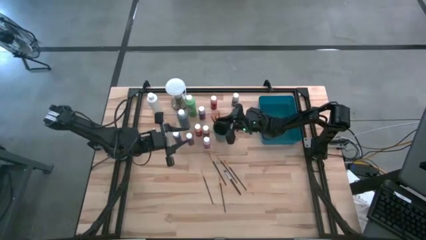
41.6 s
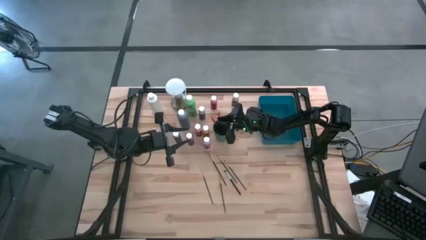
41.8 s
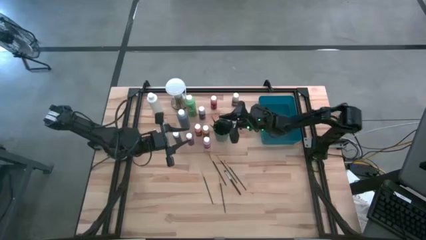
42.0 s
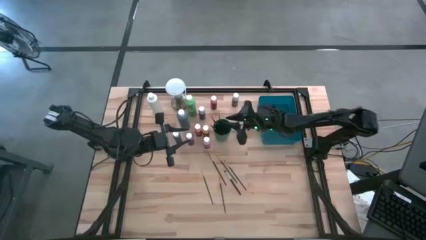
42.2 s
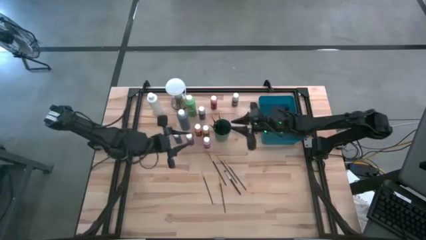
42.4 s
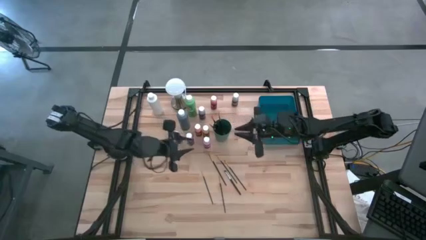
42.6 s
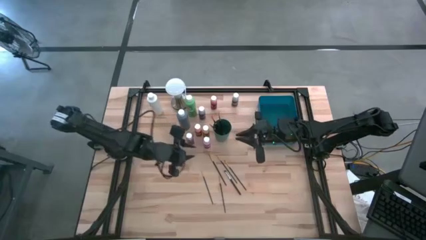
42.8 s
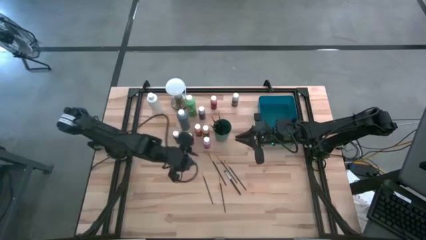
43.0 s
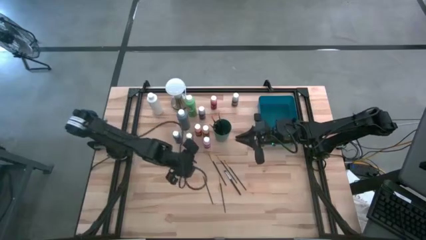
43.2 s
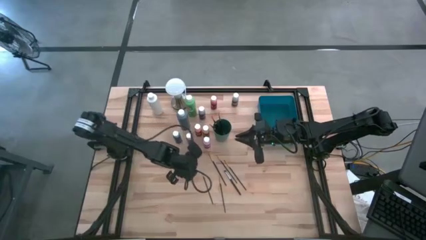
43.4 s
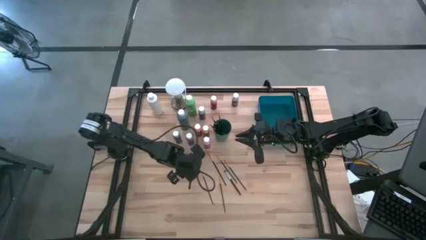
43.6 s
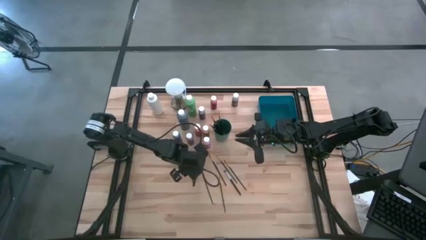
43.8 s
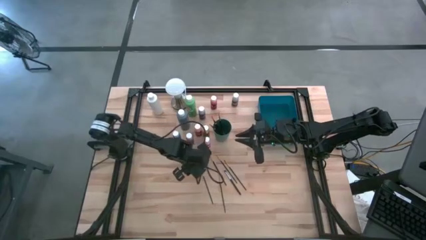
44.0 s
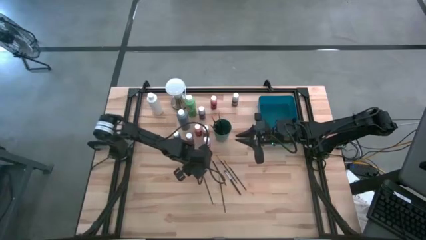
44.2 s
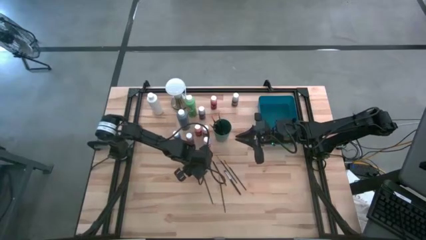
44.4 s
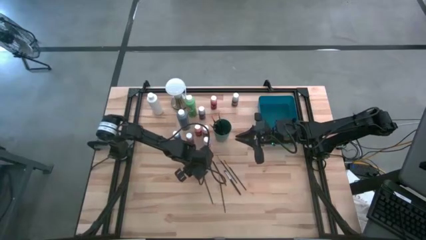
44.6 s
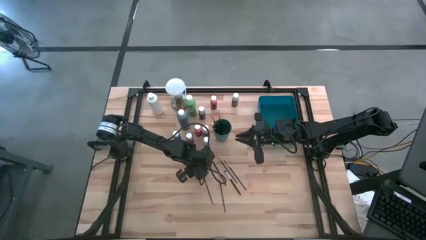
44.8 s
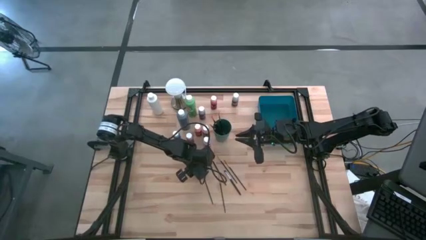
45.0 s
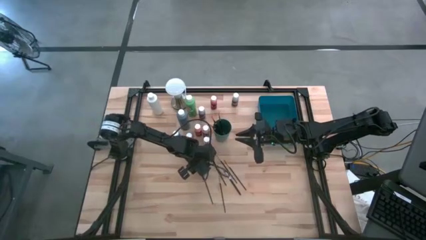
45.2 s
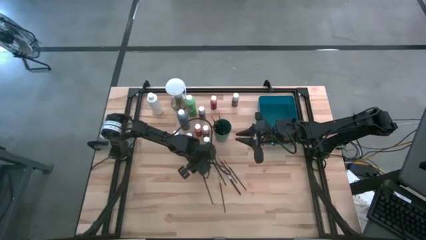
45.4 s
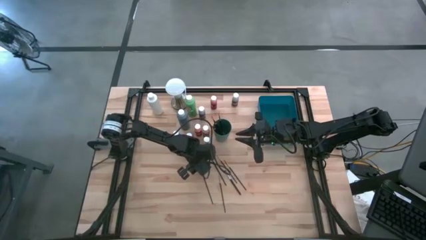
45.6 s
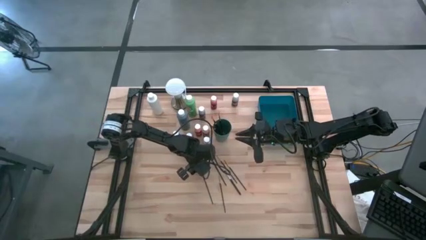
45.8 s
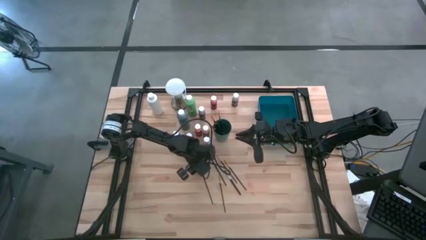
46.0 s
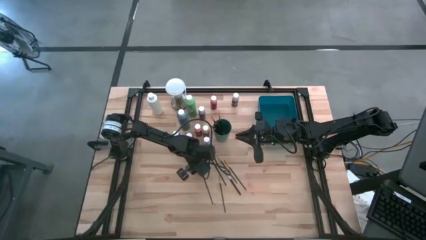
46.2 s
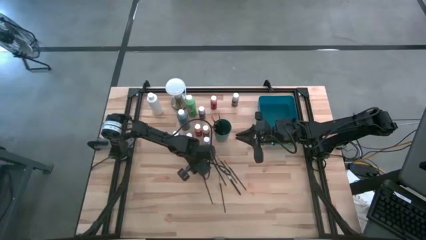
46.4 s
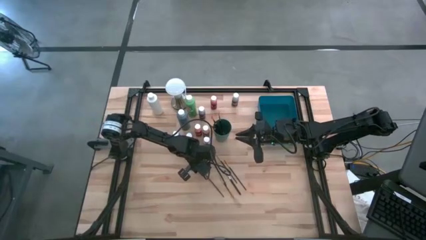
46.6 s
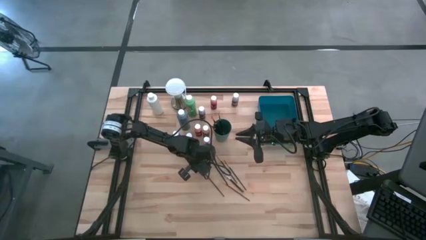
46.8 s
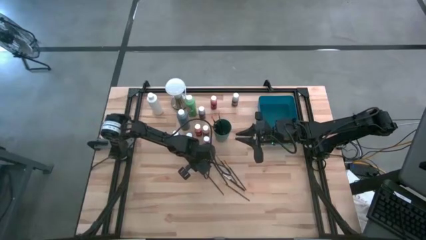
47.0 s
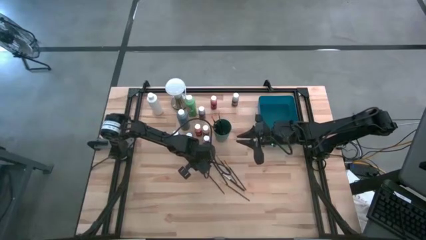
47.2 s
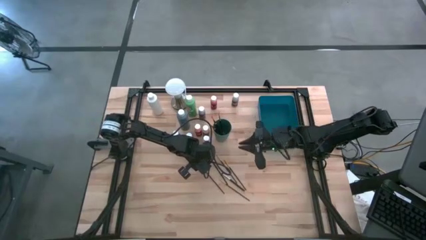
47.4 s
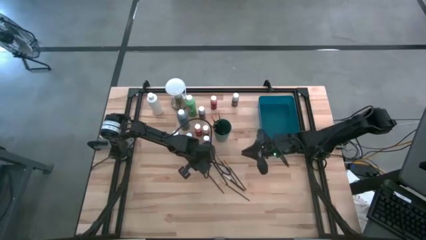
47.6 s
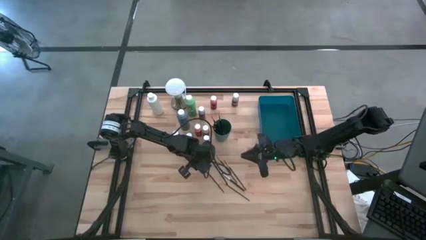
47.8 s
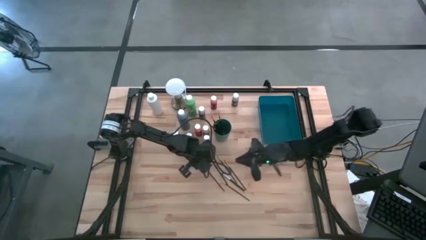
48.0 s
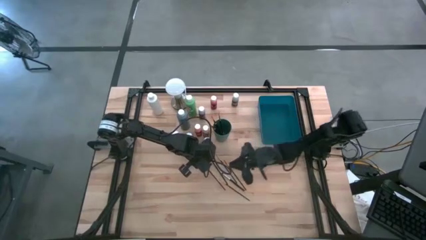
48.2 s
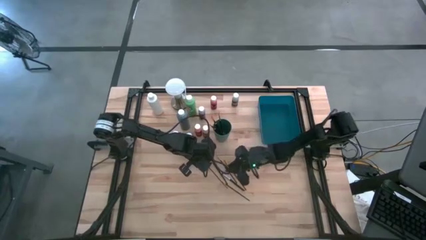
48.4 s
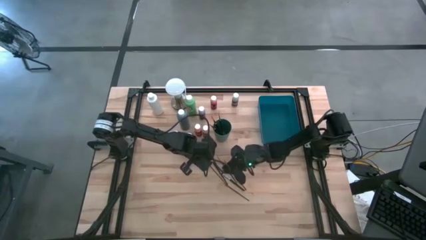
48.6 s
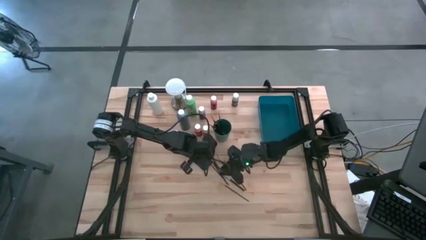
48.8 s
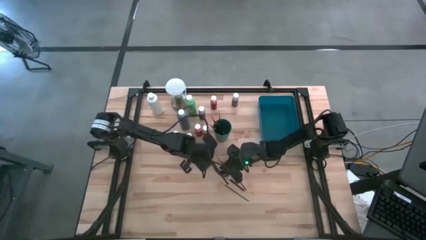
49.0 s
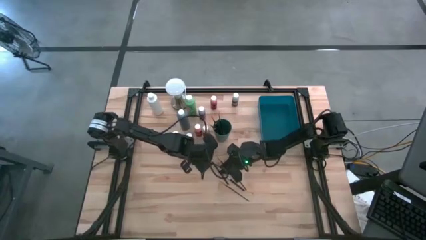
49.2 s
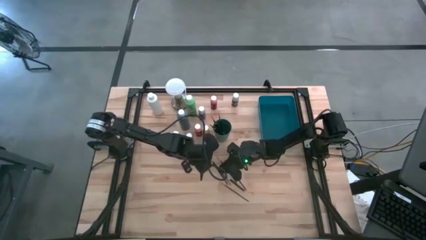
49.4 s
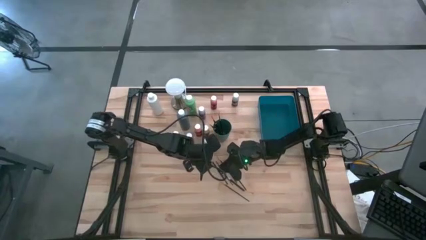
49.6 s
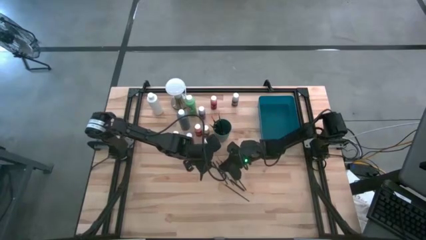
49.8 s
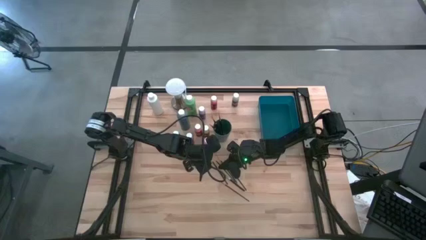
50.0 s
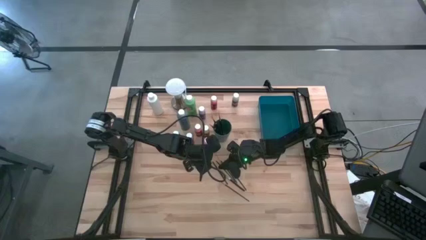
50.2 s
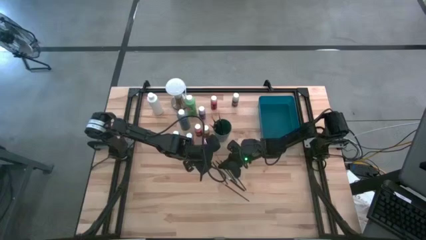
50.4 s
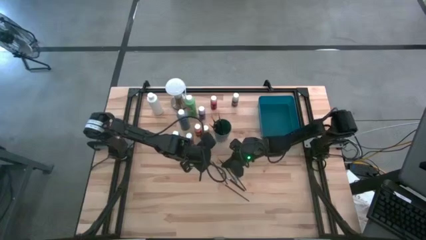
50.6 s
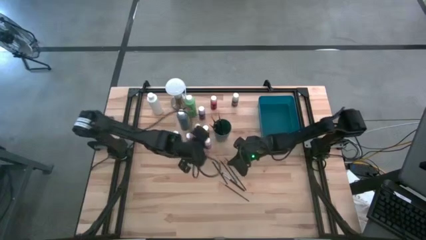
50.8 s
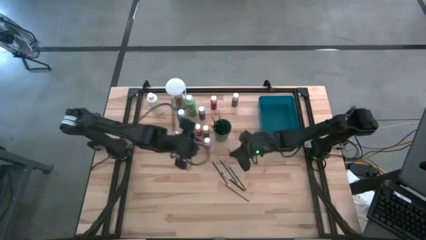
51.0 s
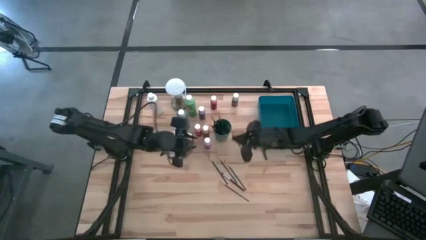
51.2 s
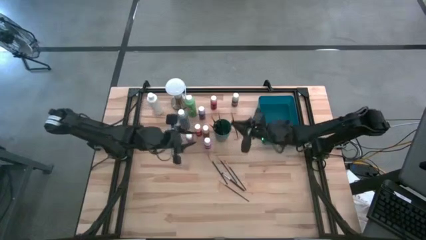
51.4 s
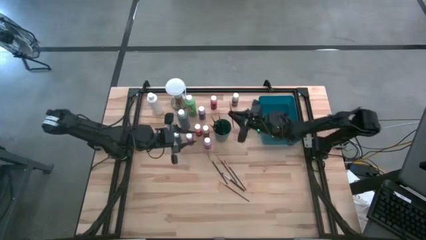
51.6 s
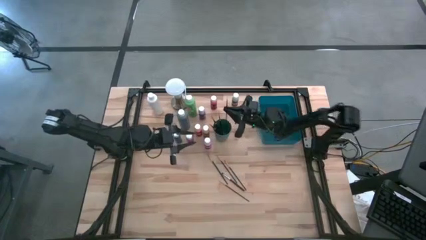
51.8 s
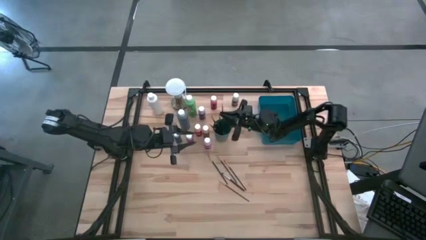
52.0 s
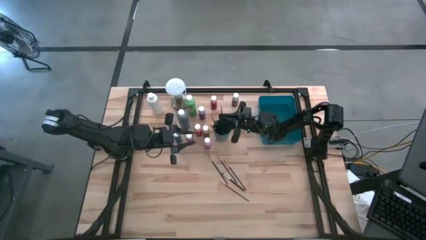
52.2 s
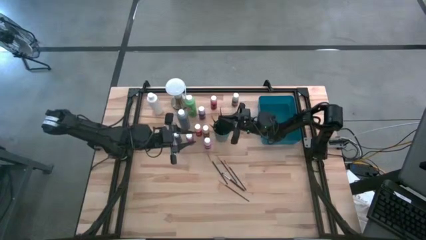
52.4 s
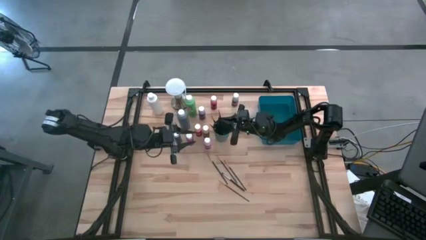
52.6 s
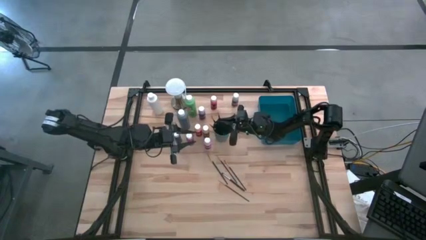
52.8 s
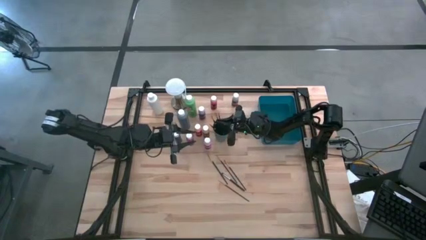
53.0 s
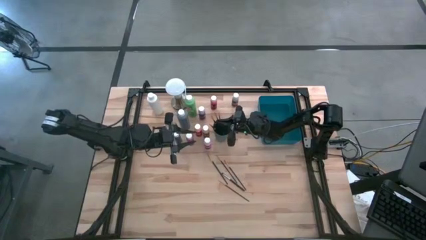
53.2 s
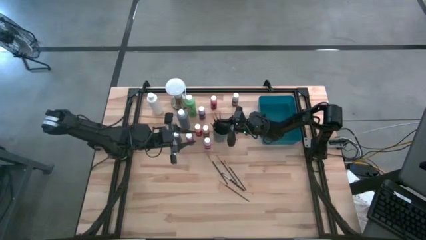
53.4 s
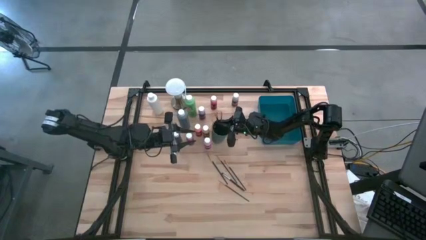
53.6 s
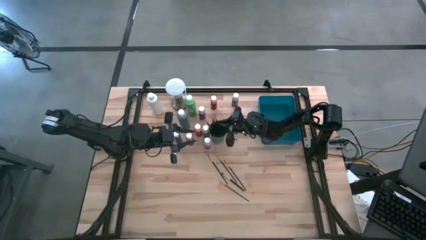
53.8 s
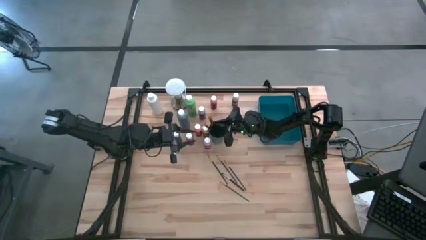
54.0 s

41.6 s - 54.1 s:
Task: Pick & Place Paint Supplies
Put the gold paint brush into the green cup

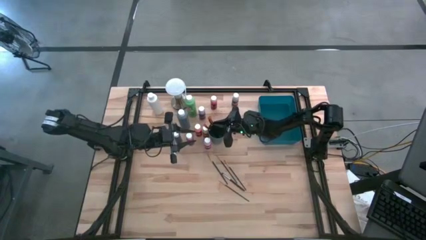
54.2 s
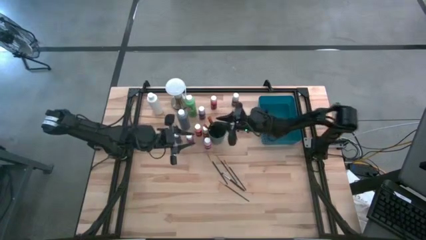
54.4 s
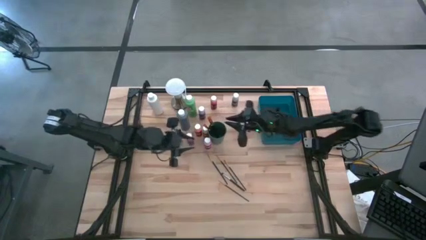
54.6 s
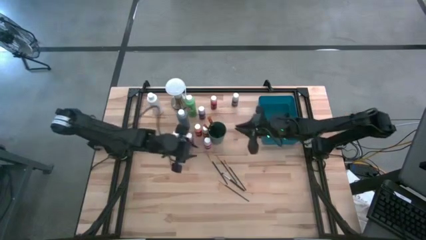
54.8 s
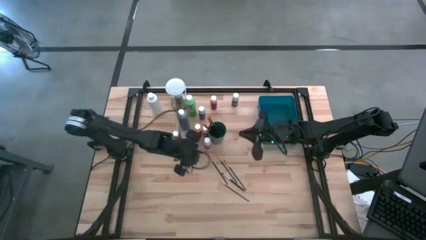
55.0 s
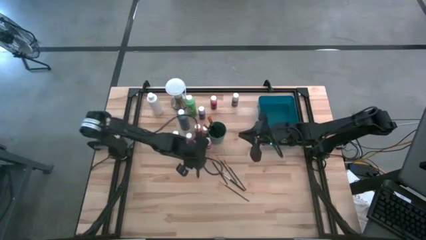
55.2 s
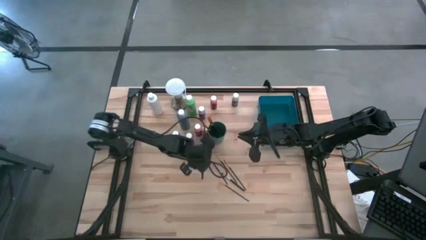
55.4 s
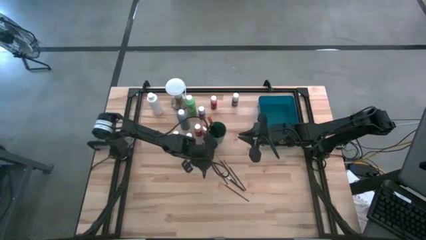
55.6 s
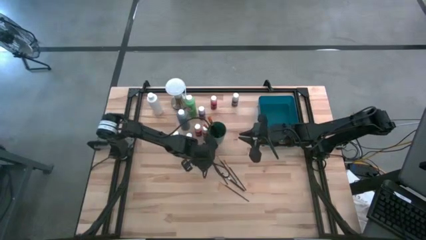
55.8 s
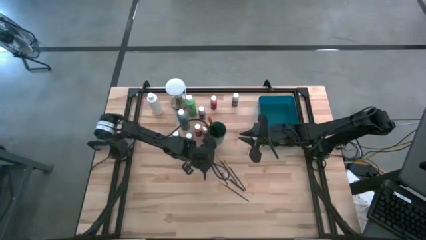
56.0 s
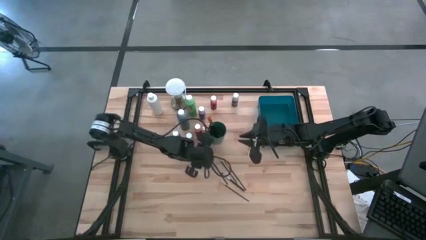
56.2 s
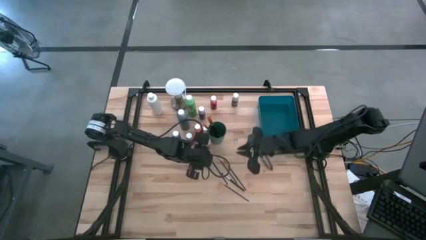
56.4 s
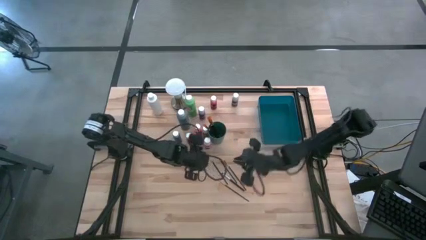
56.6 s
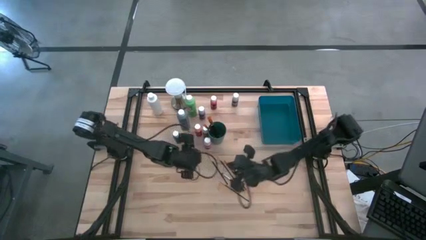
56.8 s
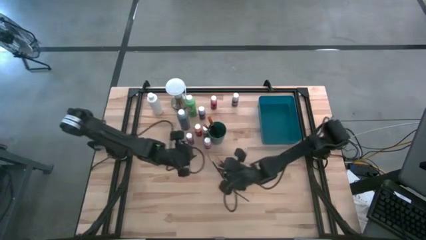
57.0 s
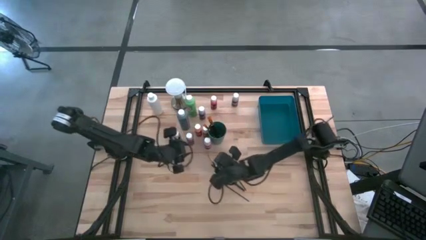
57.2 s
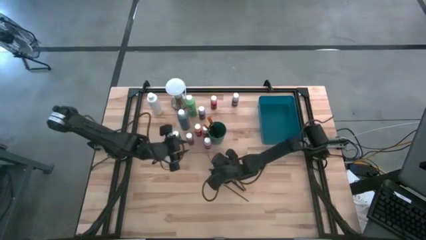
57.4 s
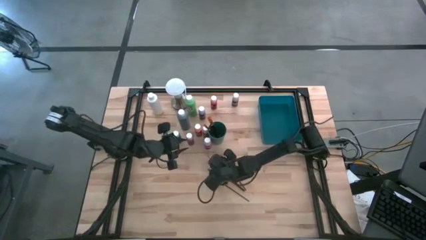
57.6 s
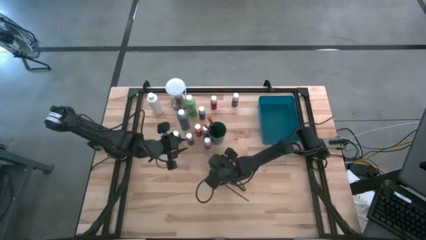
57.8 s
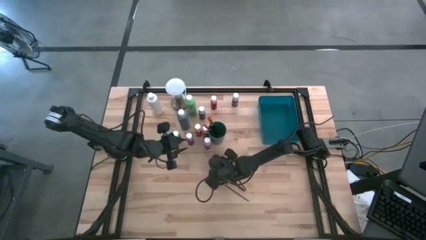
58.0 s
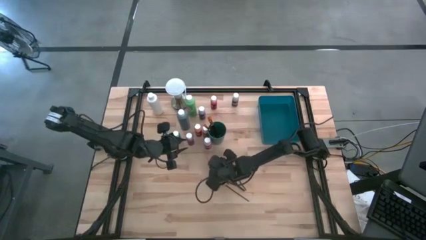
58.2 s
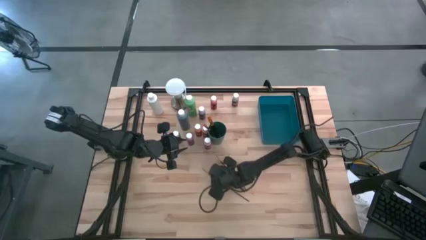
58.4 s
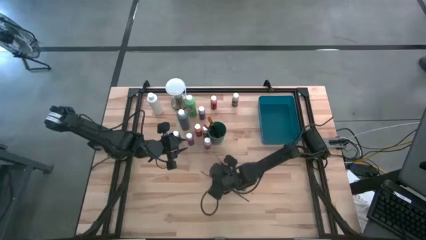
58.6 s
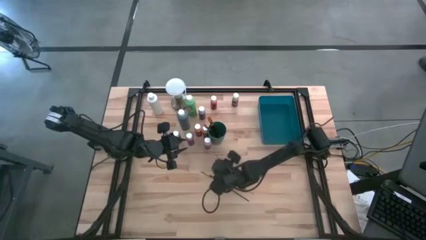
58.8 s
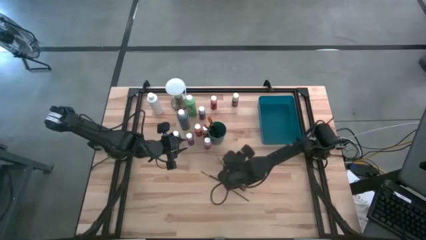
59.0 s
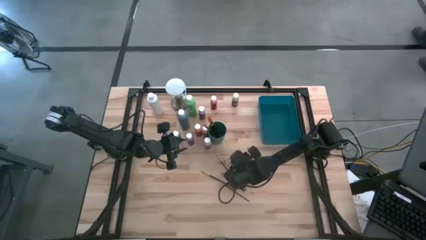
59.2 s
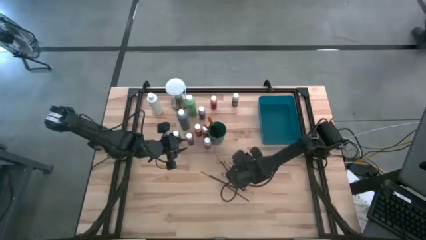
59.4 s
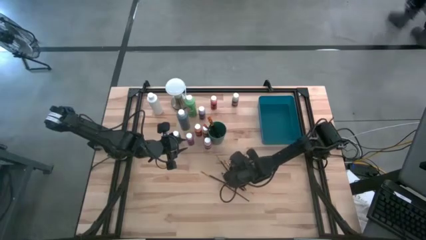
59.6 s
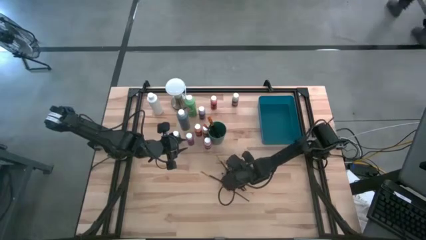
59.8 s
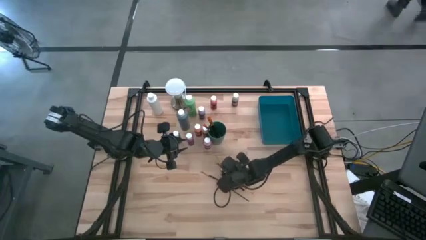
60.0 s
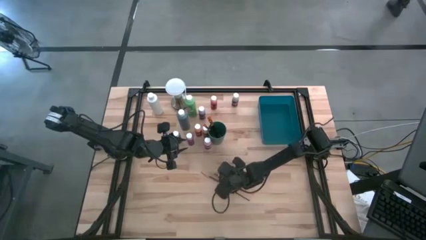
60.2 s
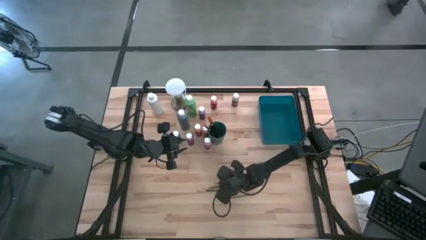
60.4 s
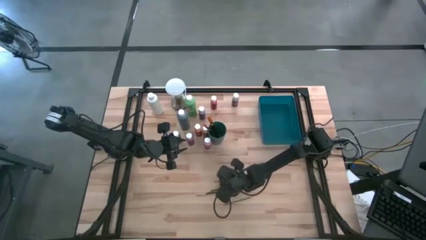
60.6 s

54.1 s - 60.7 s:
Adjust the gold paint brushes
